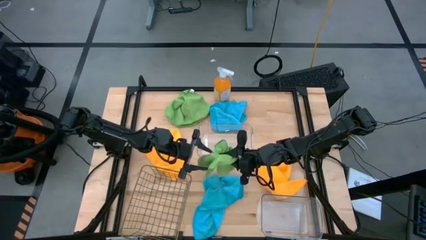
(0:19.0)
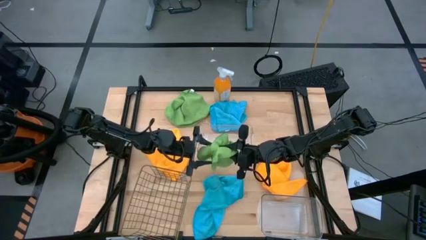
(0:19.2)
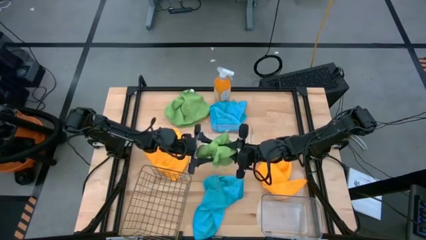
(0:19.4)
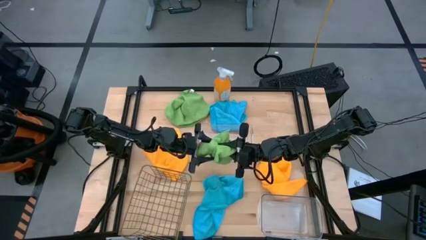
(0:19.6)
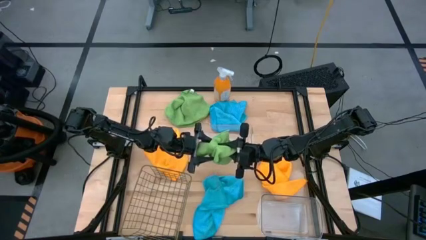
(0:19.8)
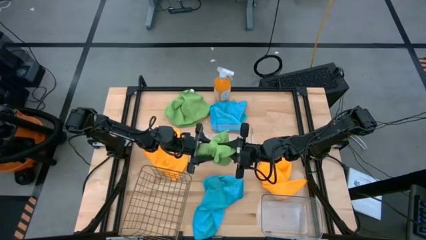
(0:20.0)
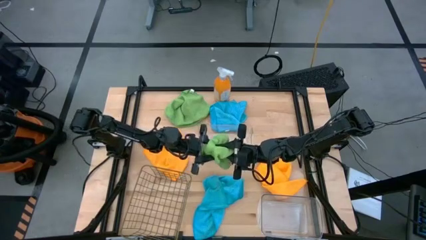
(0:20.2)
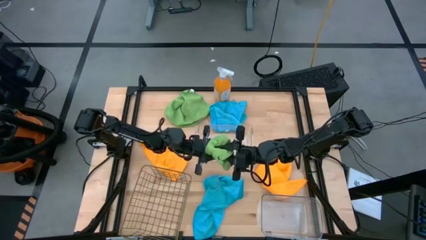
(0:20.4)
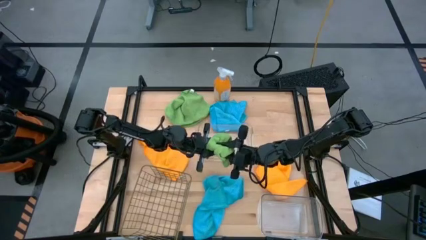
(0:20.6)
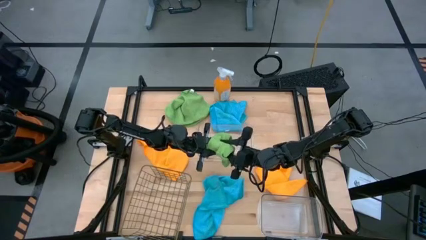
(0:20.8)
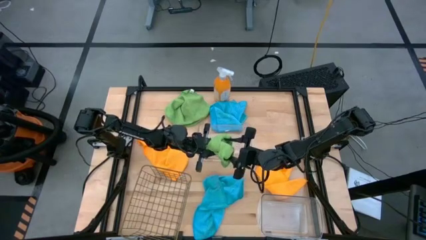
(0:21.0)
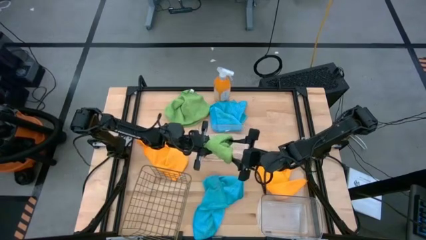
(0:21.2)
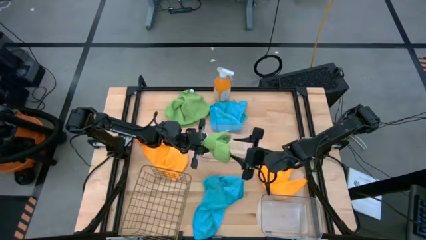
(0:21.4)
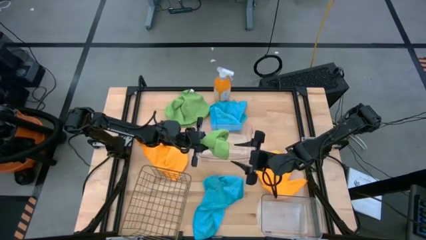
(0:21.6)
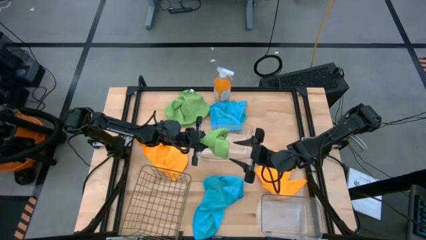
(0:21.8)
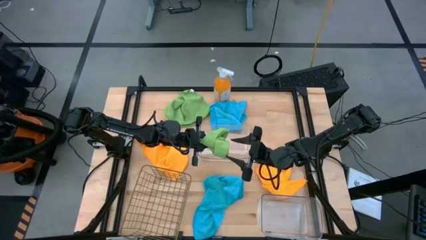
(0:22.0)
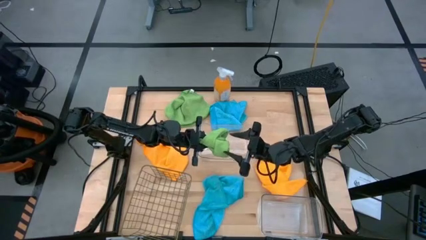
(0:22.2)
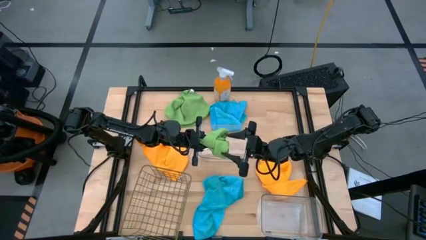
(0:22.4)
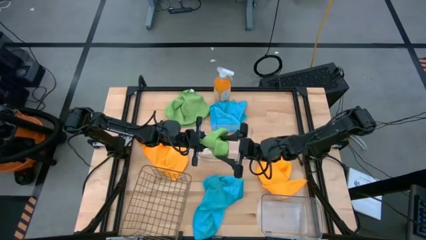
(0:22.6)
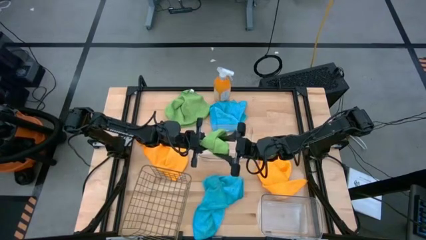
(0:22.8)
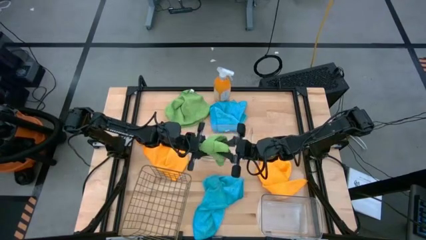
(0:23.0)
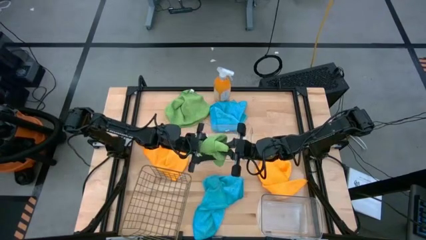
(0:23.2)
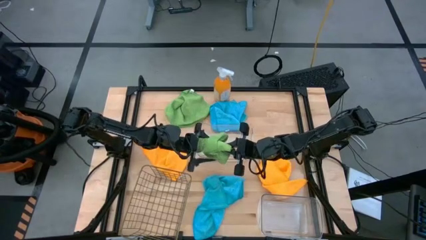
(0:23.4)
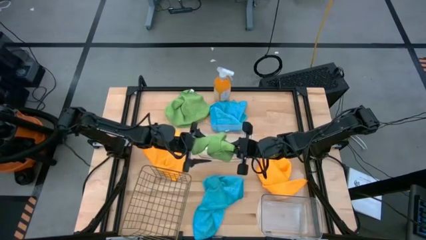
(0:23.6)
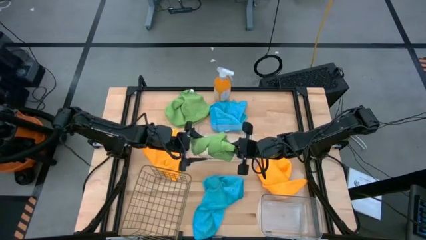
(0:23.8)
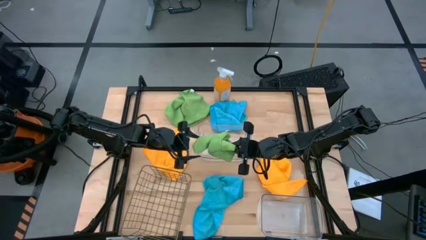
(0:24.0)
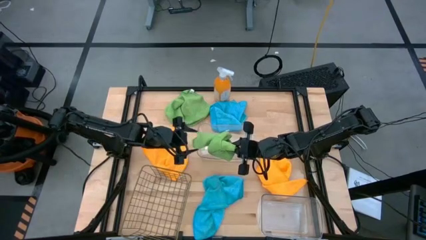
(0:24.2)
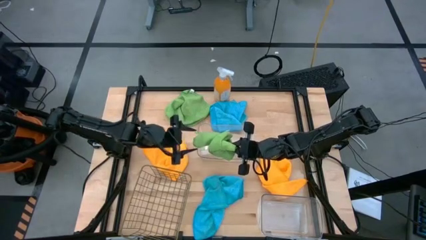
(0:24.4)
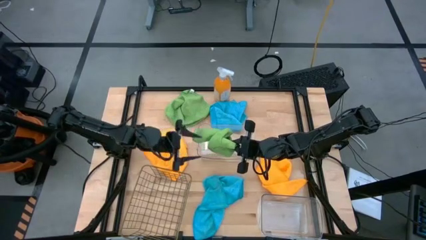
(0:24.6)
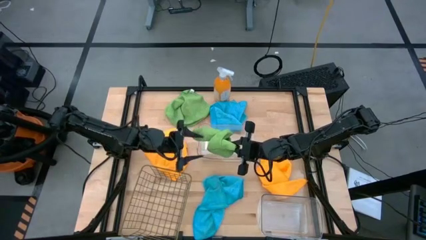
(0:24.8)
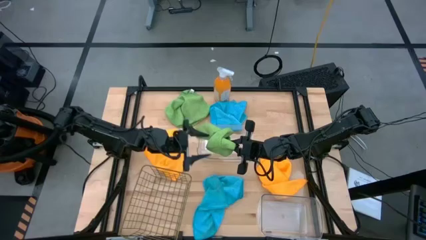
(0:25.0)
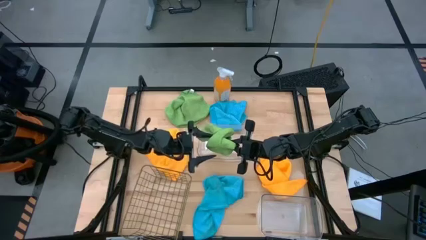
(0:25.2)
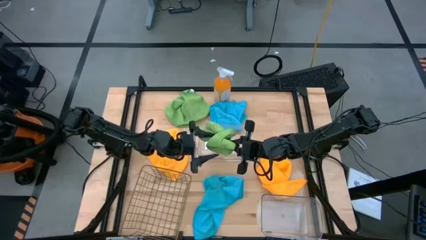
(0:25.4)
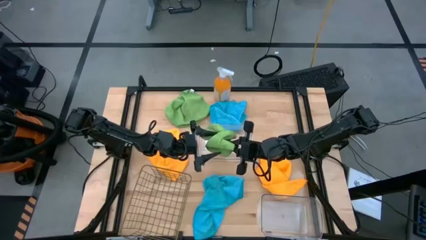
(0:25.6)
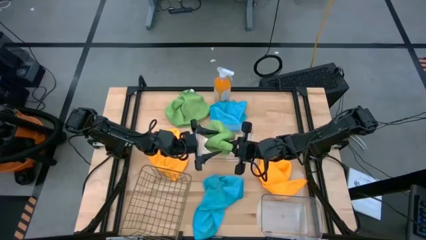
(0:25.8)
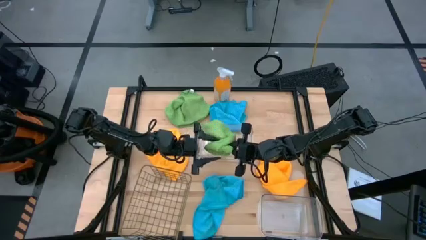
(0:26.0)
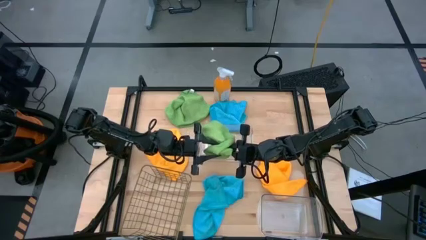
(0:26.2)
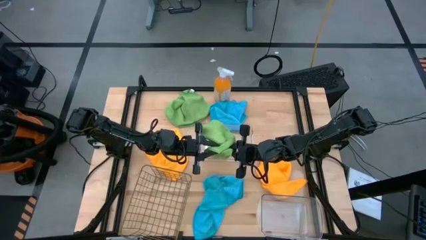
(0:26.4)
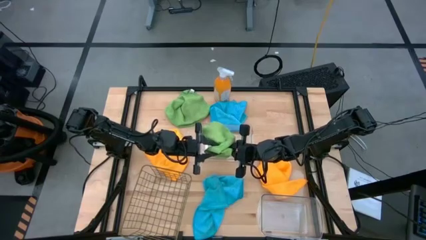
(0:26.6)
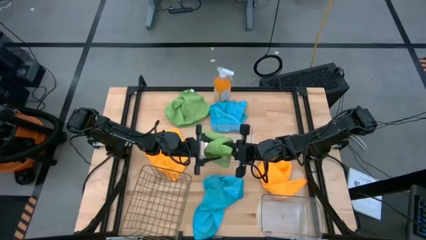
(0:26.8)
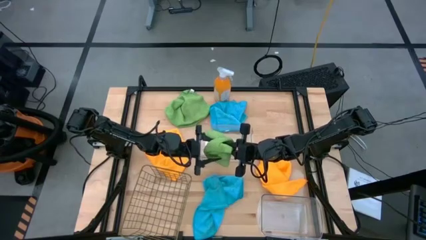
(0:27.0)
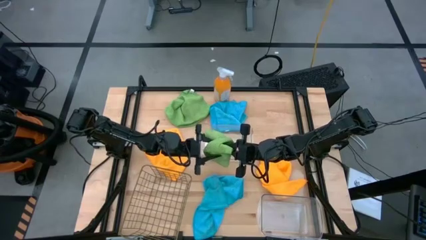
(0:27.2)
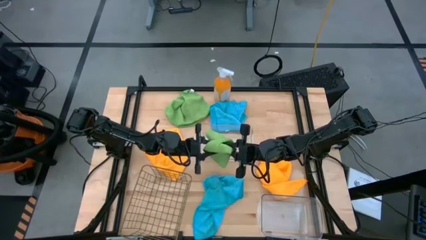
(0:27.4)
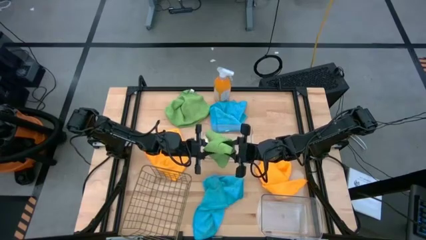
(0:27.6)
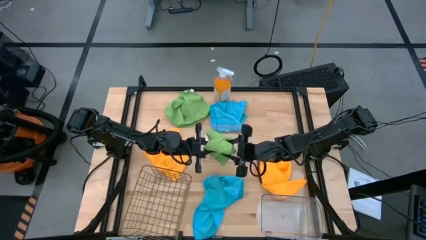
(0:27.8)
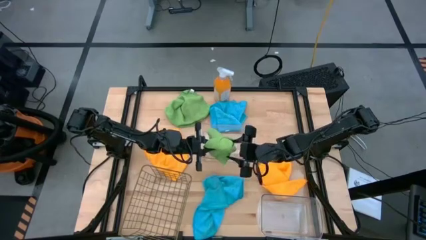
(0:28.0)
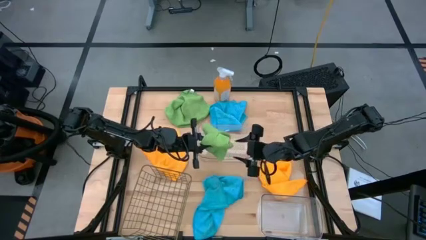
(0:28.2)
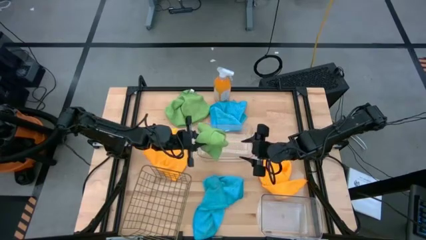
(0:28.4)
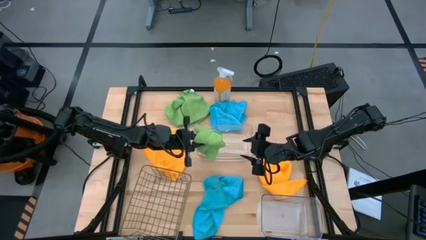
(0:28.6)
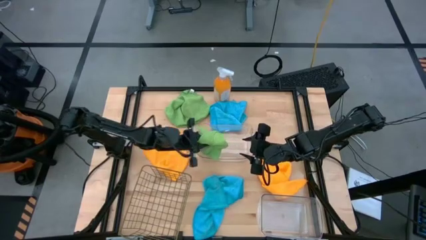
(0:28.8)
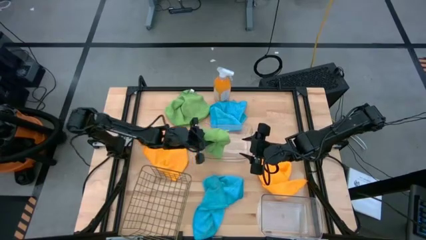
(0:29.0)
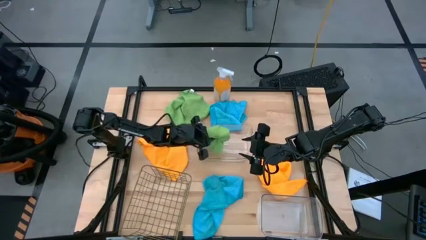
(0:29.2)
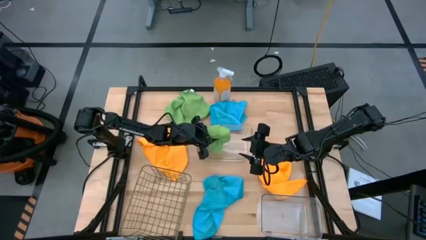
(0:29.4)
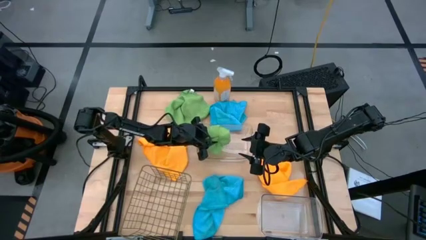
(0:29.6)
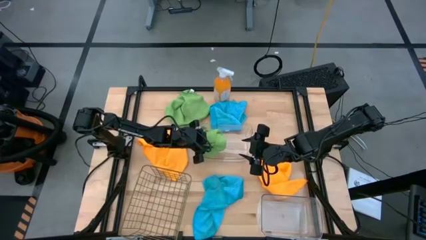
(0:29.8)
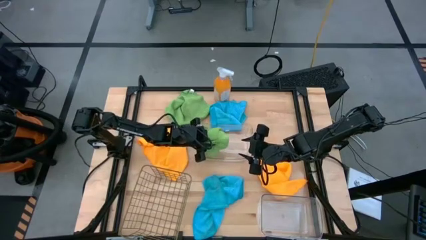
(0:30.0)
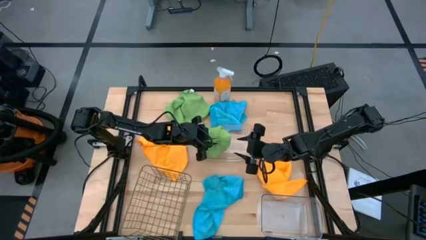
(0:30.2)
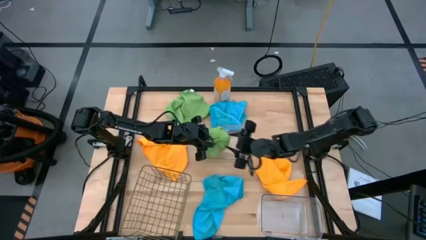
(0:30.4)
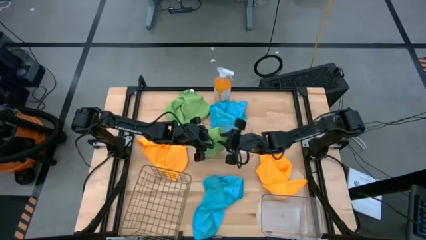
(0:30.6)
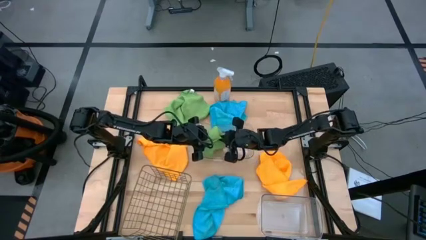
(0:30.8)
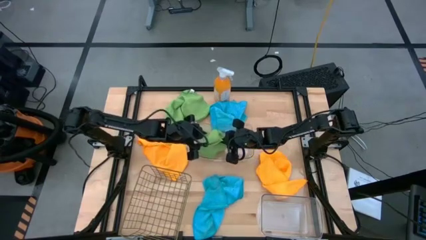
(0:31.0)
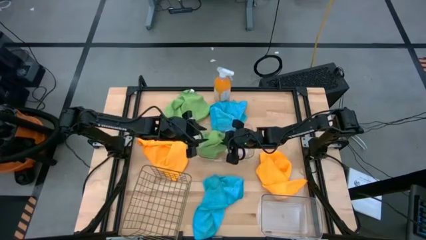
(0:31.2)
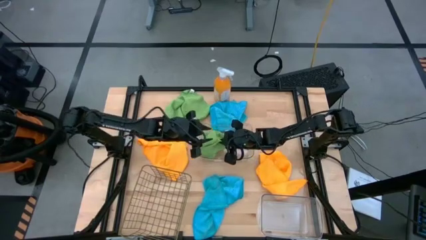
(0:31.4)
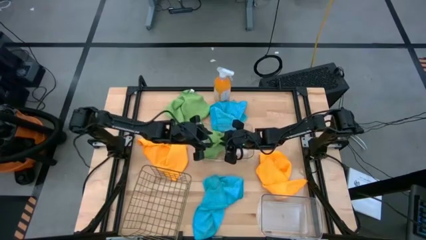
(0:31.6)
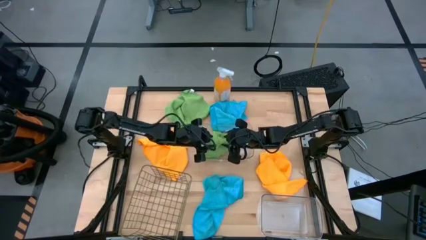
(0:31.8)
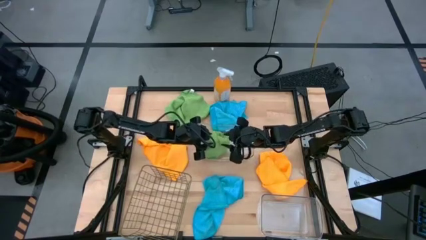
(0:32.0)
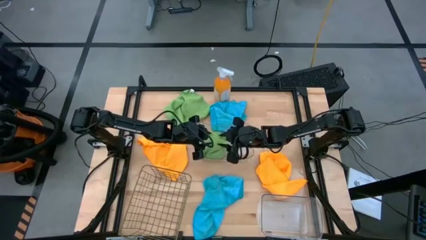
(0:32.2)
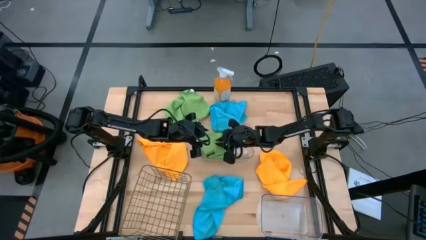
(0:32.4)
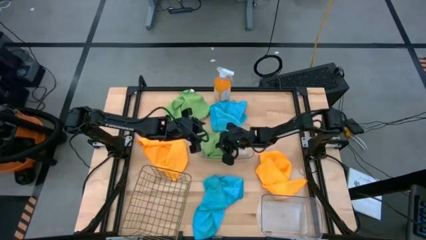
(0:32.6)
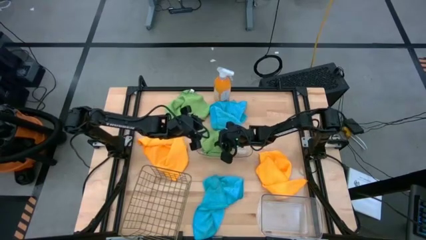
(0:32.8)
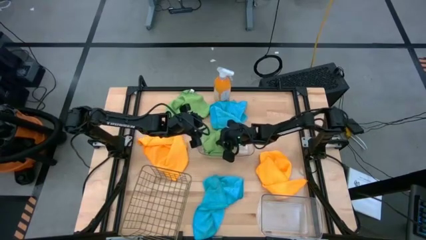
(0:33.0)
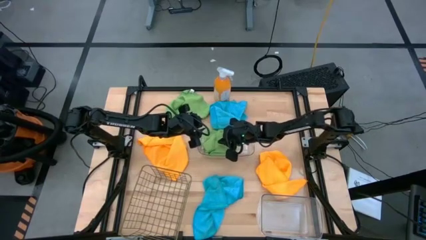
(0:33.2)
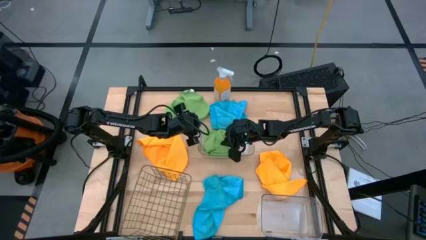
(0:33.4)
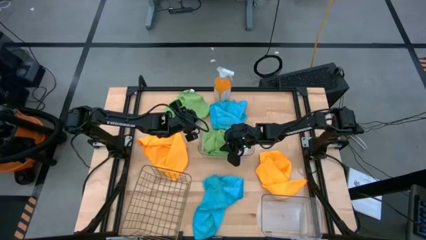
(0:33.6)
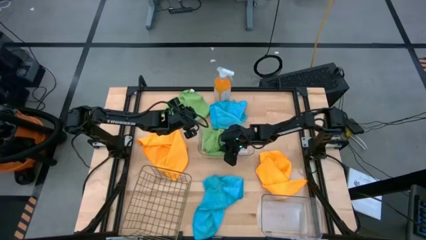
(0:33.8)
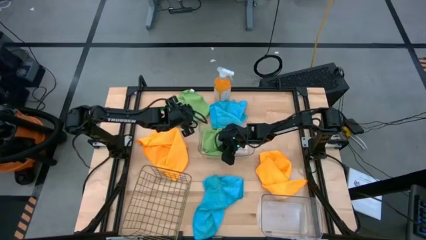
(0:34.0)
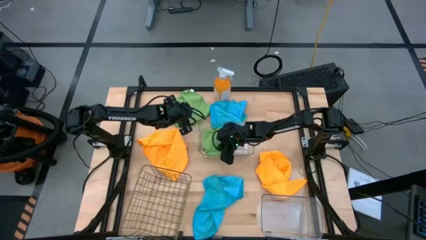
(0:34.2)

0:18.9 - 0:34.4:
Task: Sort microfiber towel by color & place in baskets
Put the right green towel into the top transparent bin
